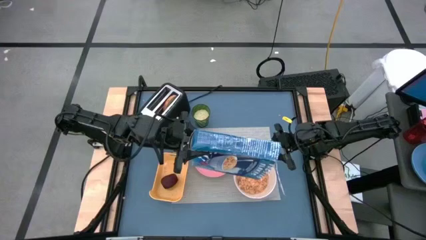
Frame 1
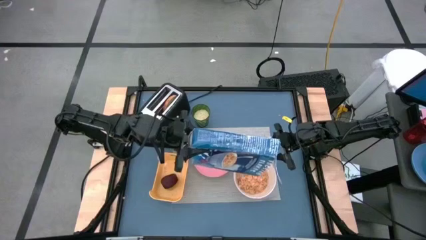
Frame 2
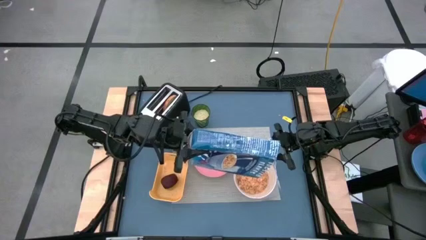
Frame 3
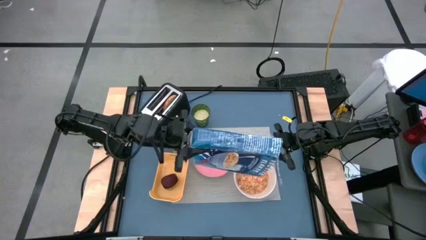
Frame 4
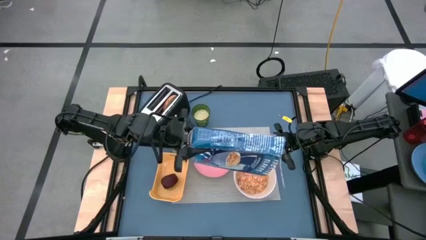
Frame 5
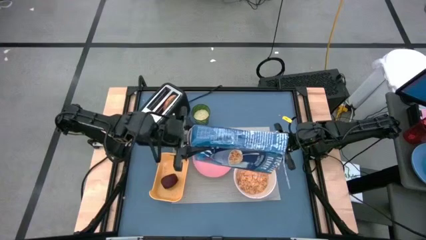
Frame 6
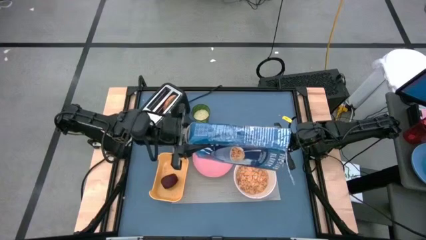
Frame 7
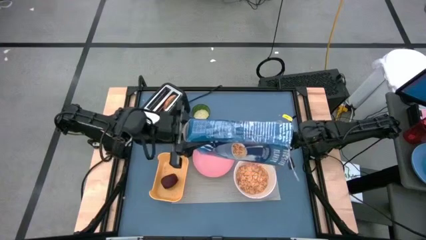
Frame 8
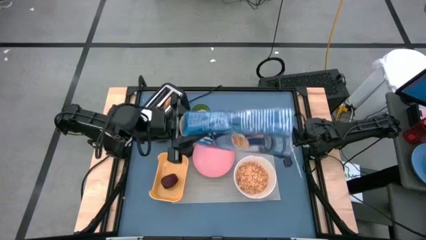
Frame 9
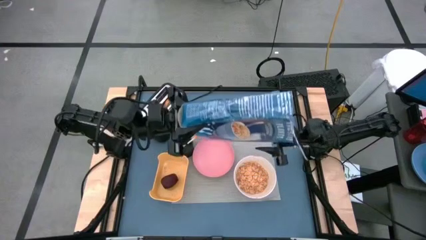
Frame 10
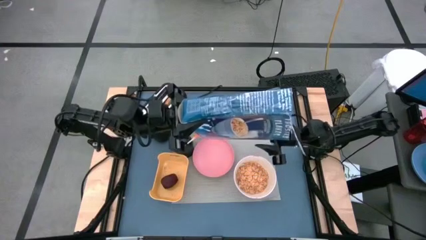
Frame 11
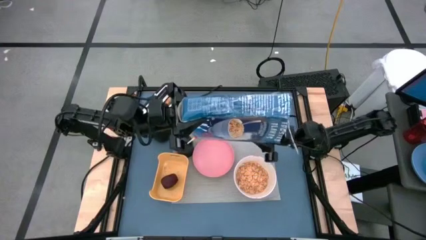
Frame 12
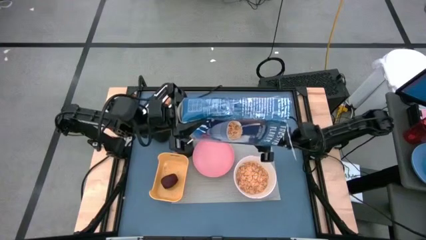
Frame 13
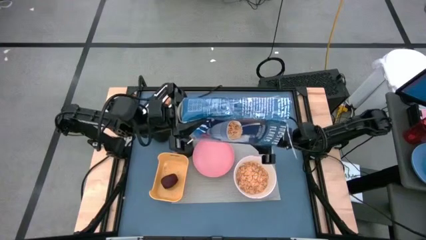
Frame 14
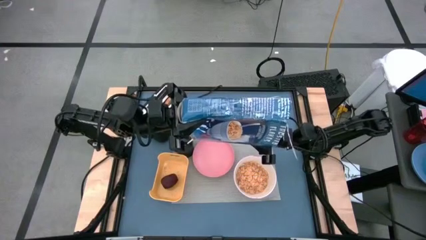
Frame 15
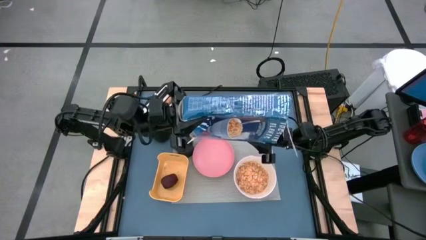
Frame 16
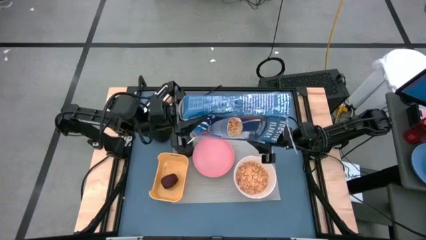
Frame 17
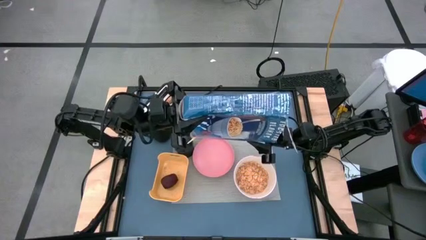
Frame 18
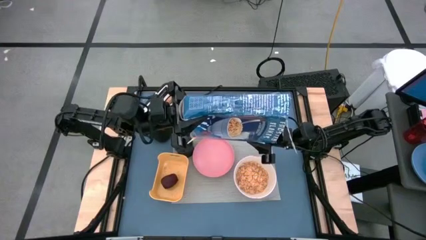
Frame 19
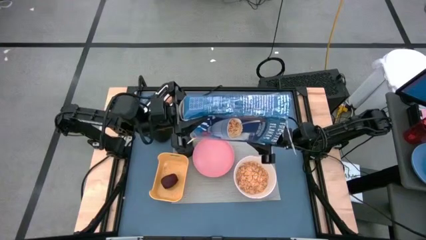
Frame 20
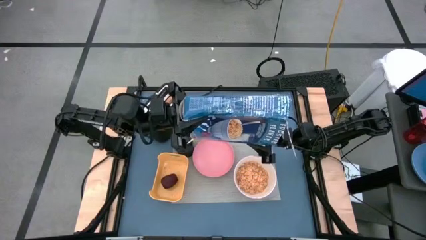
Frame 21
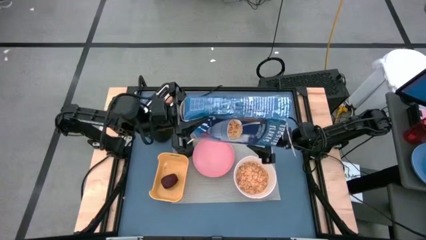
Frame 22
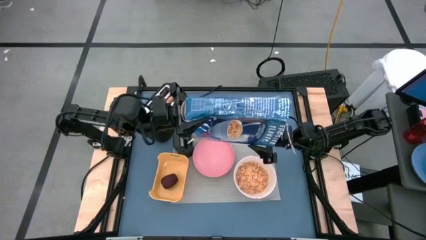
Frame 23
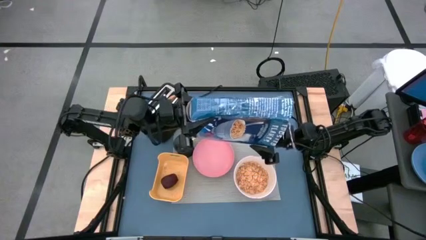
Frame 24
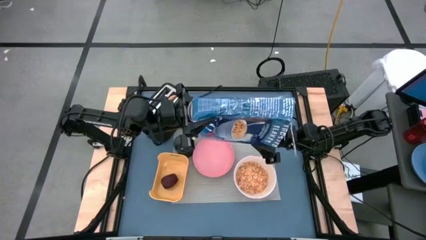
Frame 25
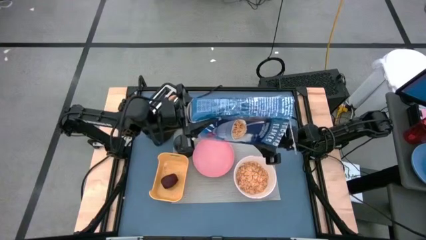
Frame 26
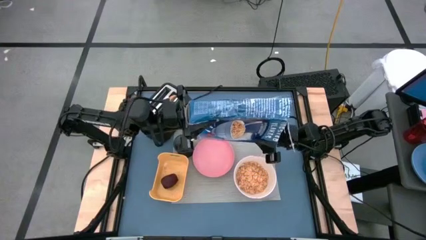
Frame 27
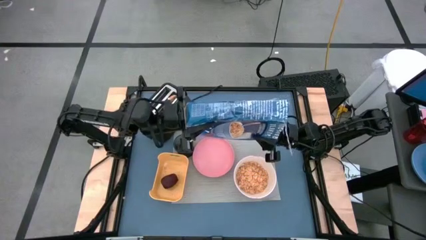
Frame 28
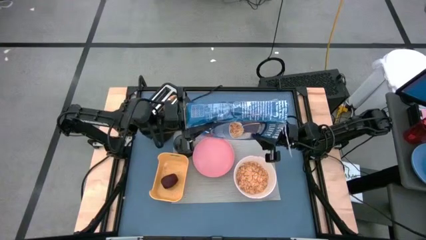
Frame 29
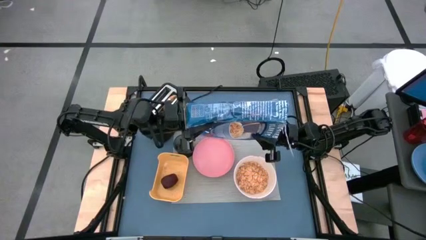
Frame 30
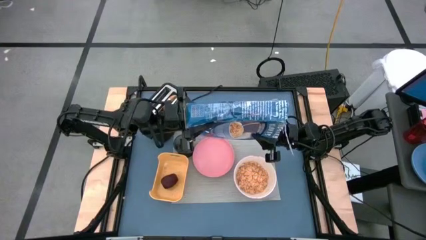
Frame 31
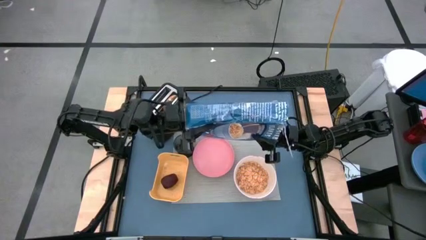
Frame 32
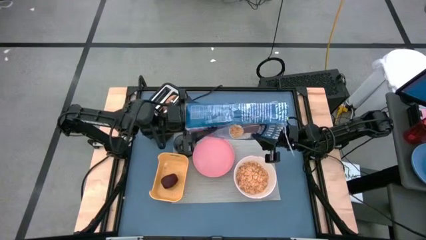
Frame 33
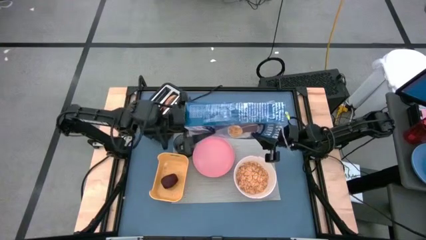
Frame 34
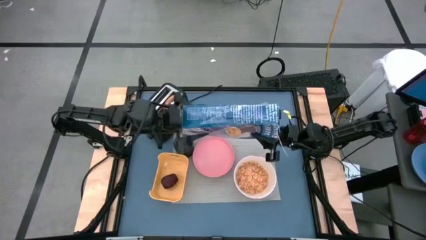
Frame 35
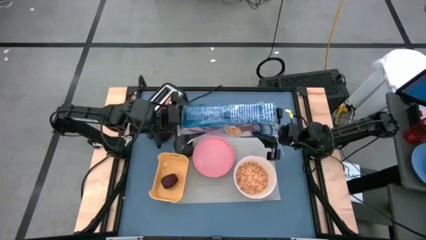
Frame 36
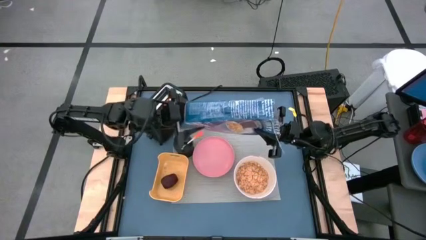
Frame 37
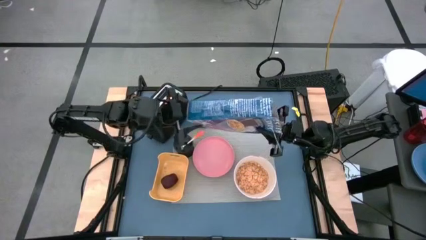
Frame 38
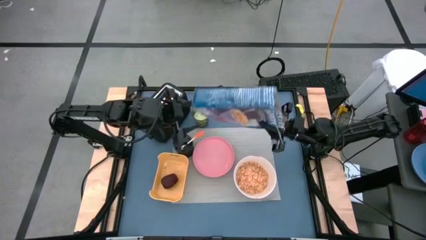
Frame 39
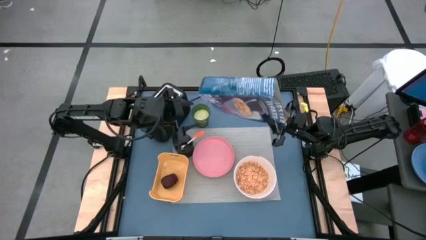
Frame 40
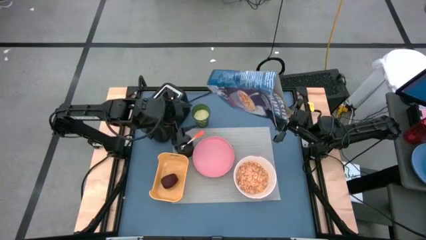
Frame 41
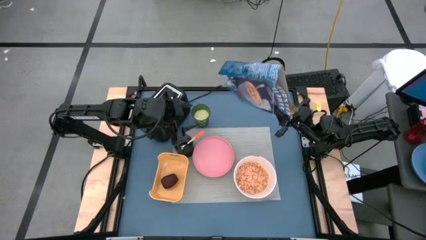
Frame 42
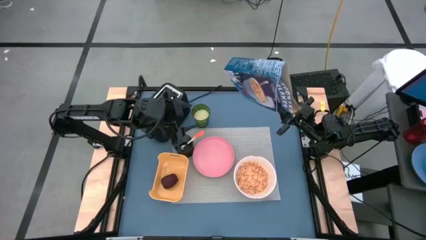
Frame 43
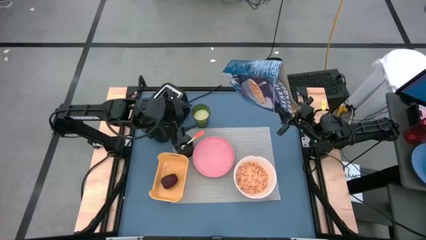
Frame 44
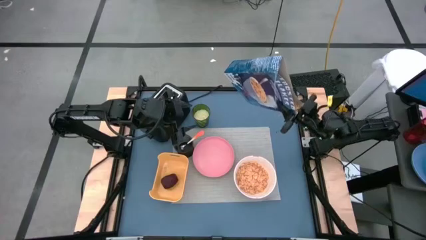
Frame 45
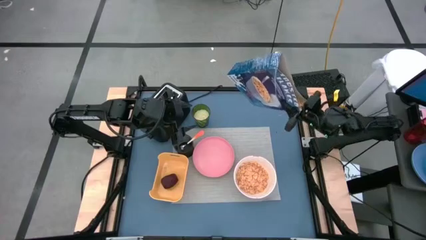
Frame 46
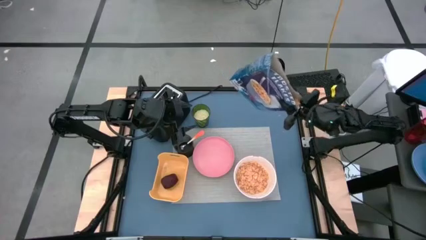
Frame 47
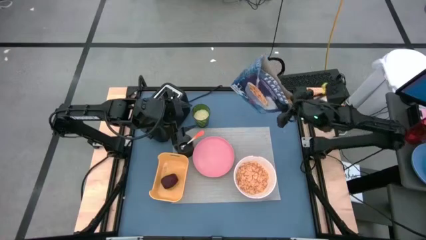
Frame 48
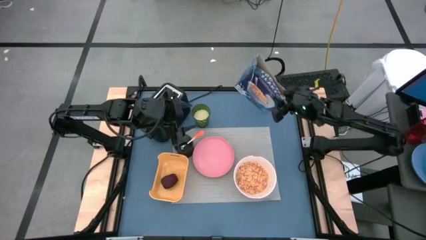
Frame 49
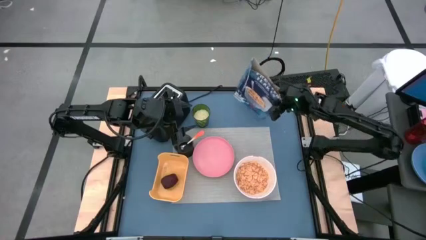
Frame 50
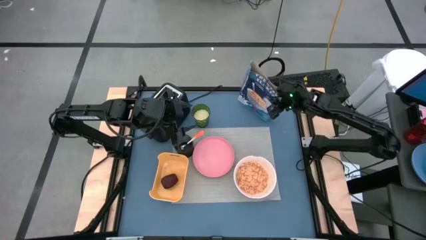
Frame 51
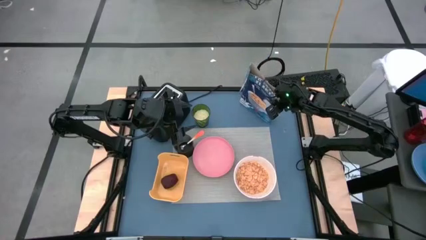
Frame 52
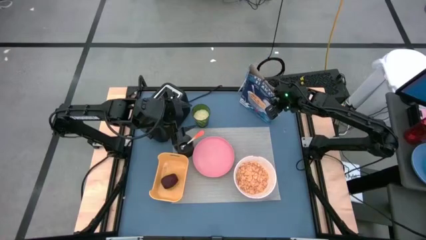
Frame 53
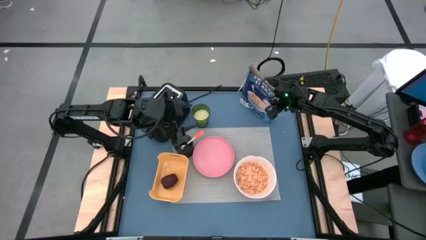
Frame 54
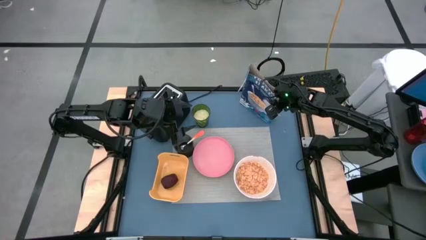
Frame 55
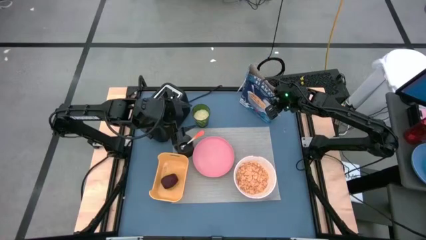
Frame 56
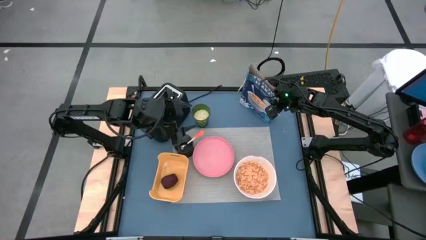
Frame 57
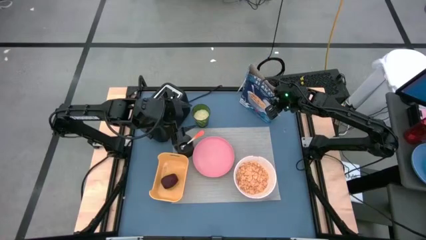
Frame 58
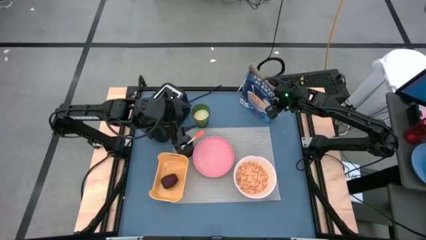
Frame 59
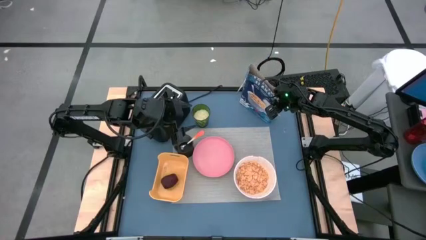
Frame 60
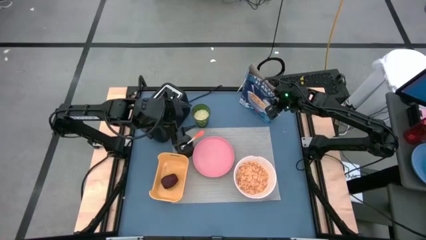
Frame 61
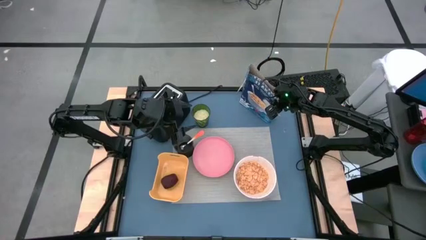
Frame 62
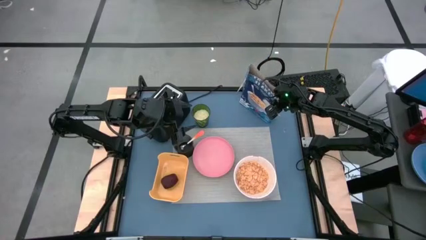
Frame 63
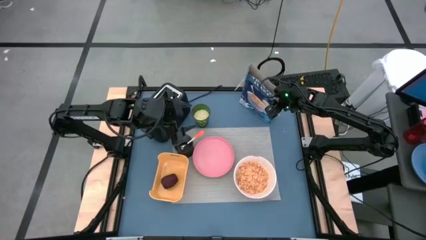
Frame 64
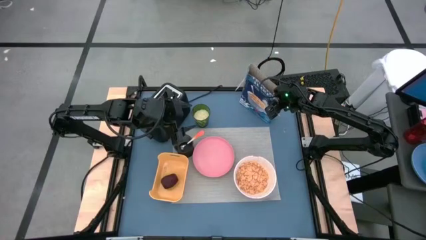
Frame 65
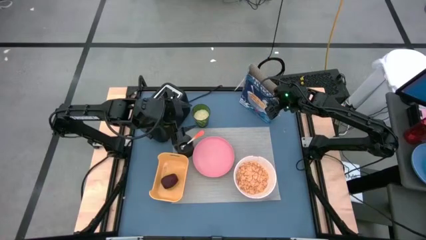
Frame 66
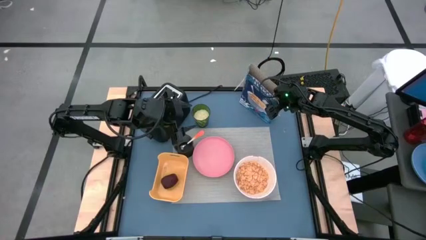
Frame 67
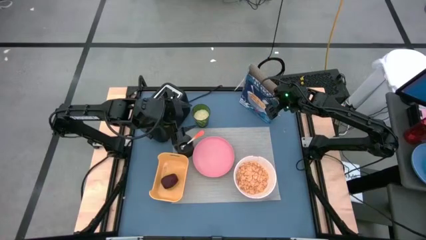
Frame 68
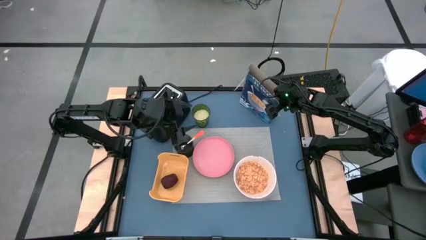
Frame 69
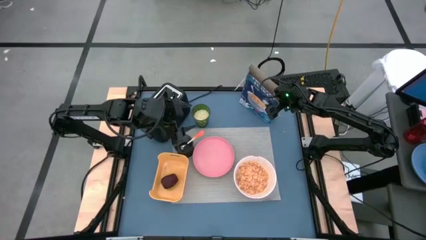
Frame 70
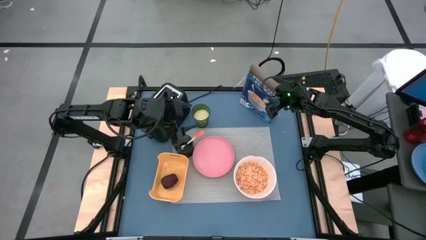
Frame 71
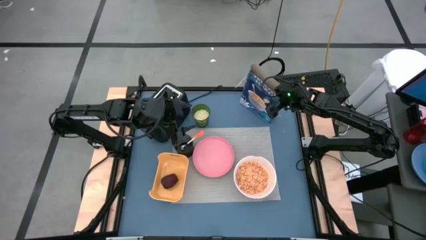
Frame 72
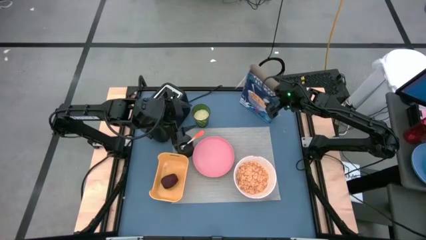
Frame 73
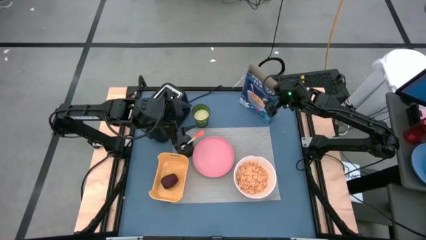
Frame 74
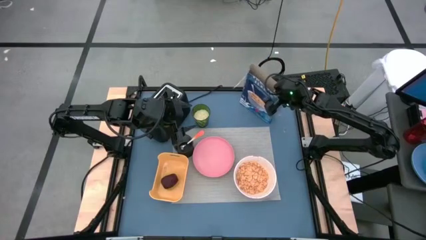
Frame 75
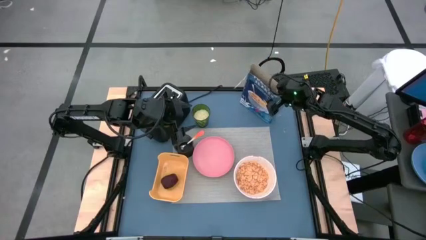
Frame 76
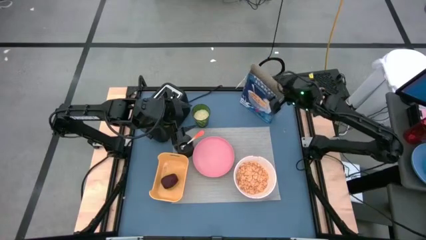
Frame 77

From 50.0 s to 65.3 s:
Task: Arrange a breakfast setting
Pour the cereal in the bowl

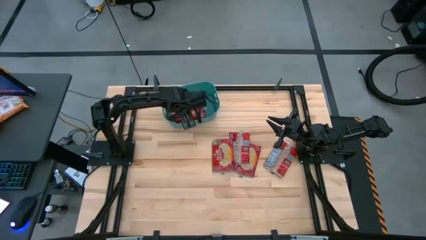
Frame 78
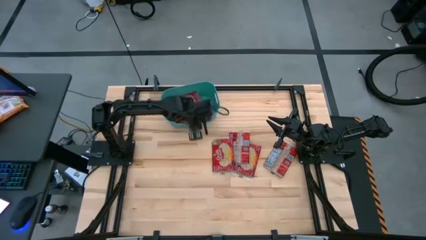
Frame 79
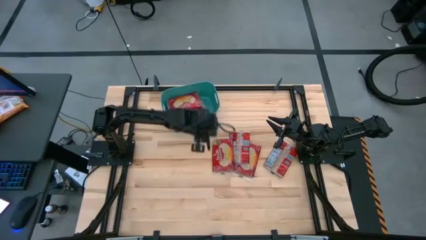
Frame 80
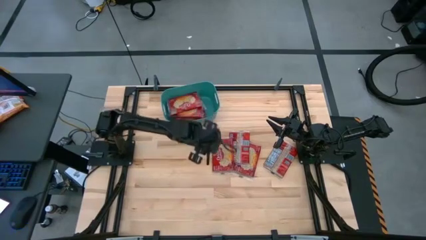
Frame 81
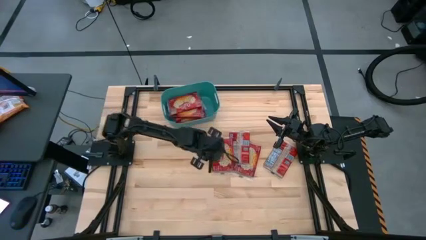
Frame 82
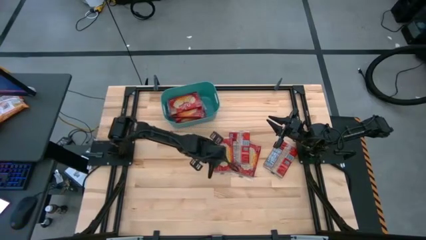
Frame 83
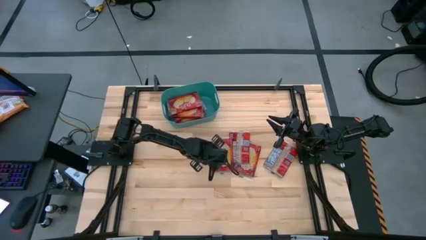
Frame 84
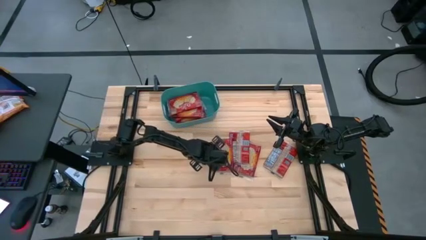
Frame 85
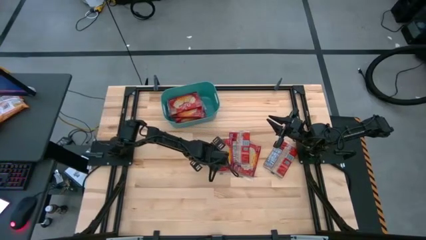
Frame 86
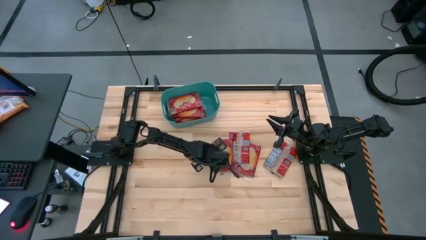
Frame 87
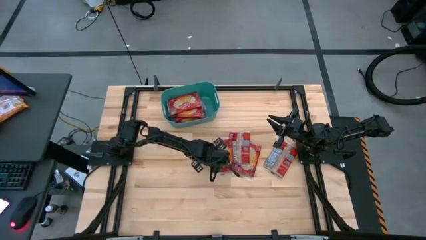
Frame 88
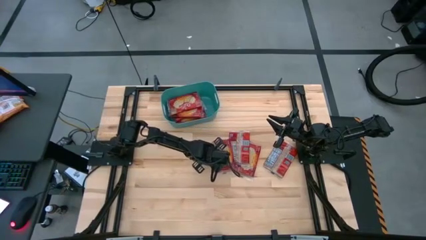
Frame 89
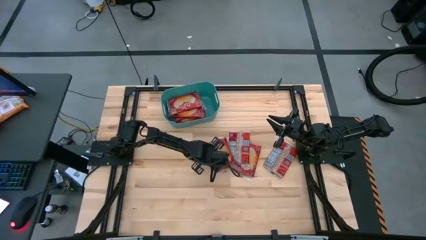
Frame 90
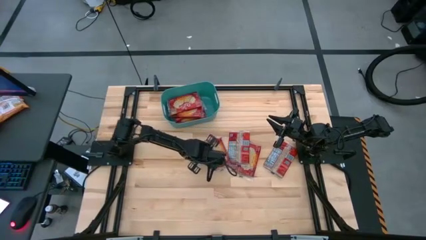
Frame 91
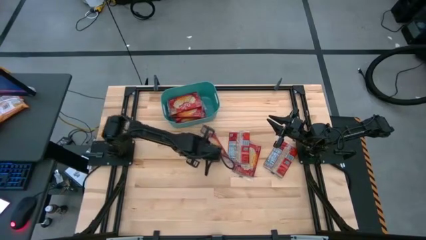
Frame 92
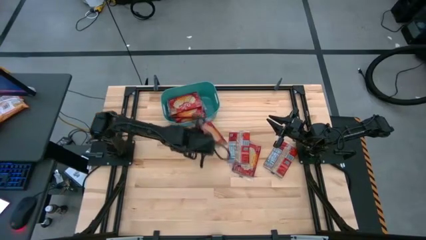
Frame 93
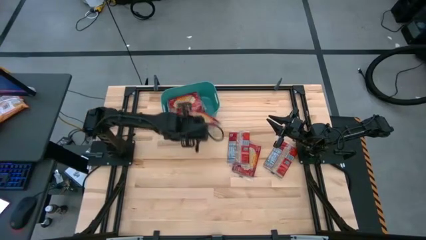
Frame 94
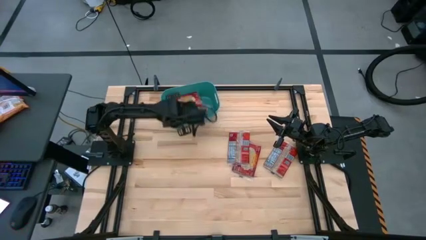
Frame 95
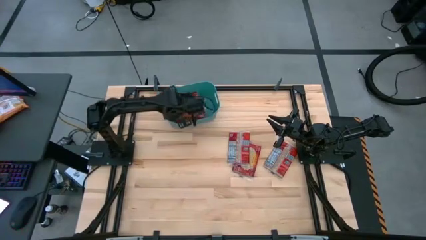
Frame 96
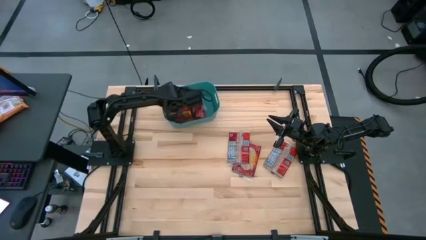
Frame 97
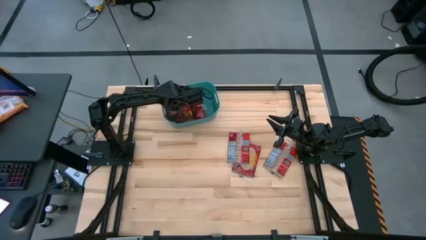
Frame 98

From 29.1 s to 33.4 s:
Task: Sort popcorn bags into baskets
Stack the popcorn bag into the green bin
